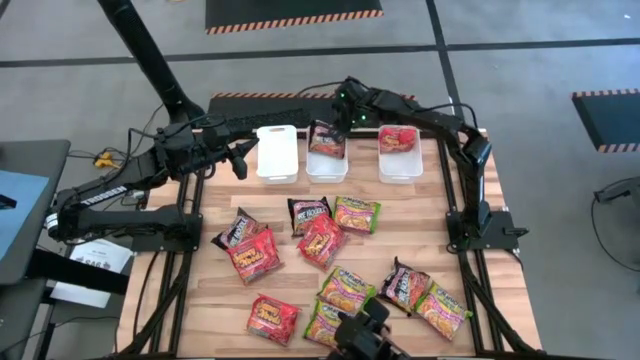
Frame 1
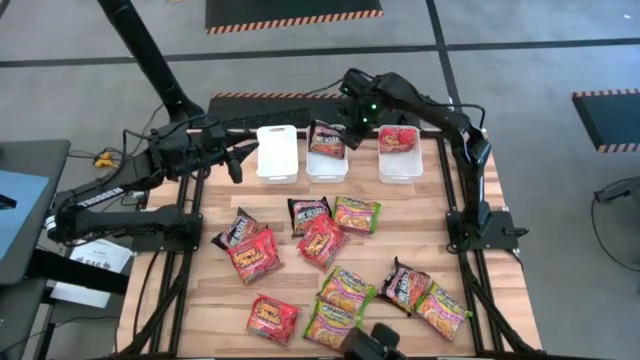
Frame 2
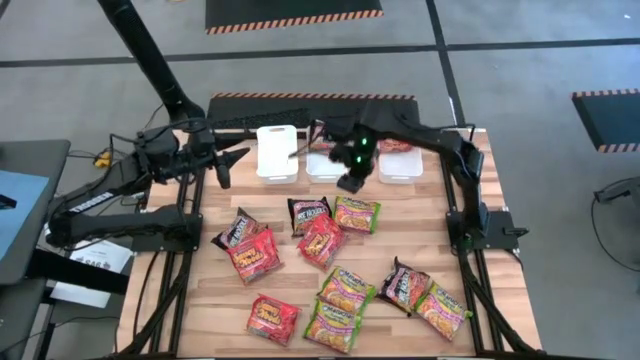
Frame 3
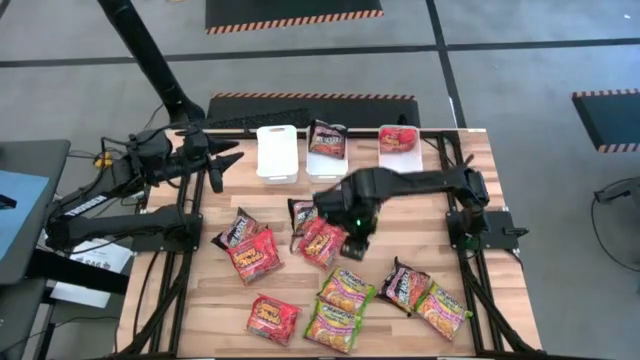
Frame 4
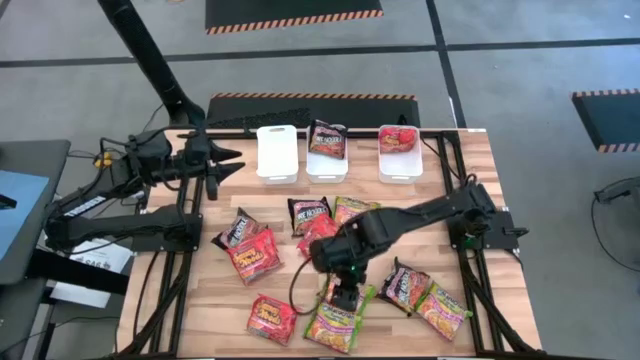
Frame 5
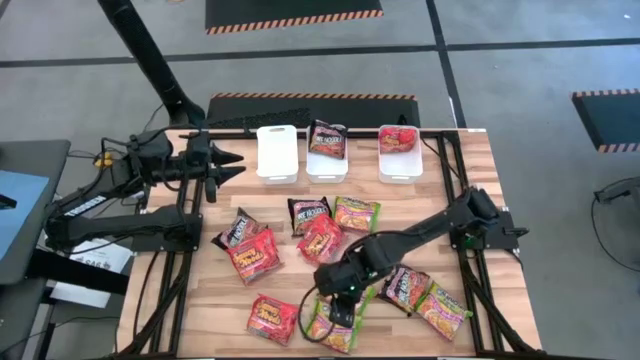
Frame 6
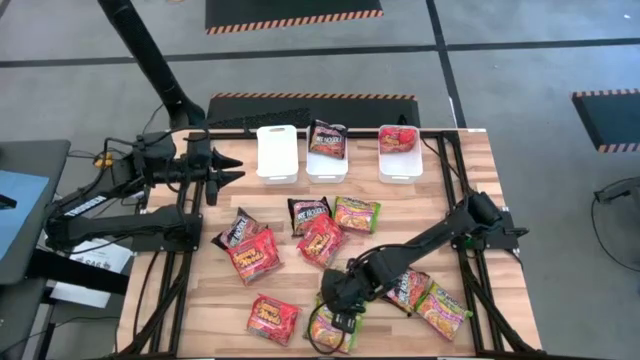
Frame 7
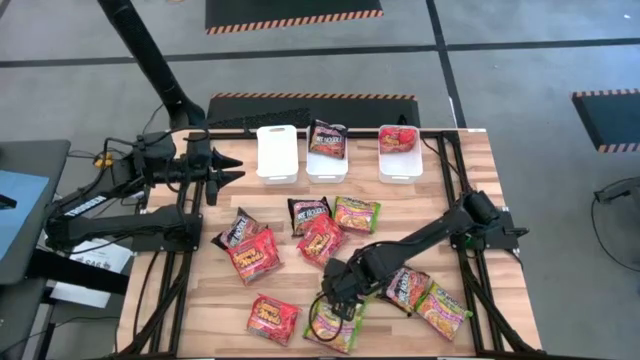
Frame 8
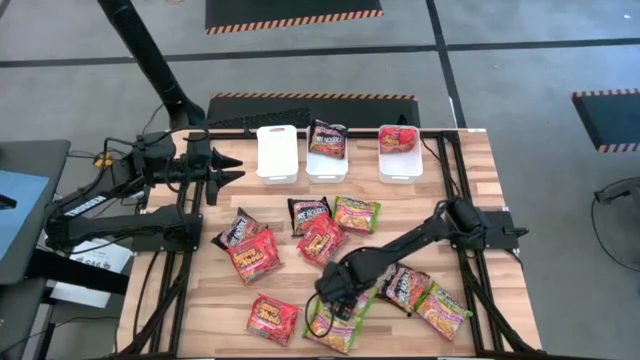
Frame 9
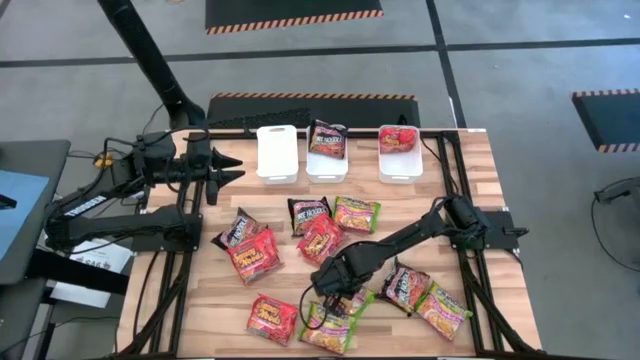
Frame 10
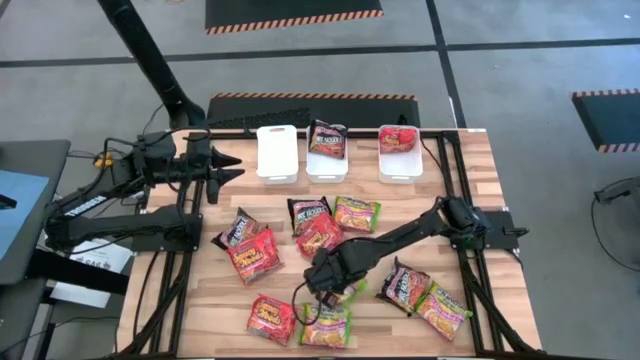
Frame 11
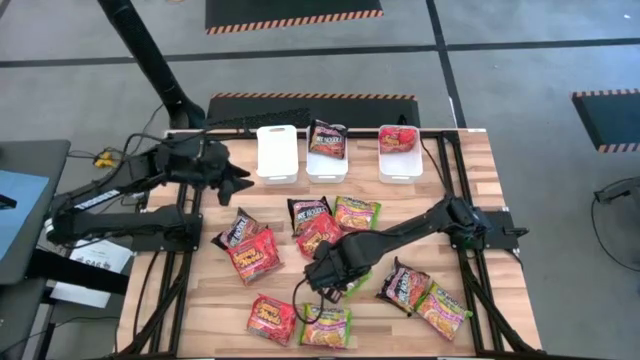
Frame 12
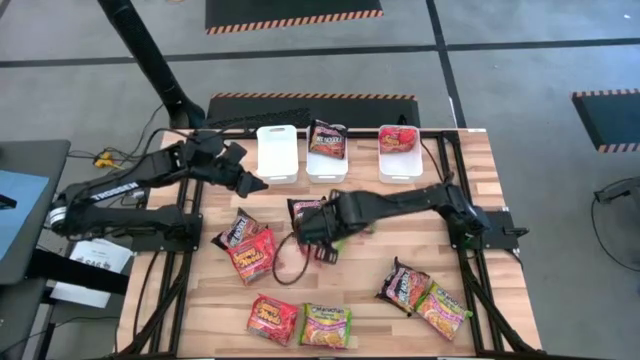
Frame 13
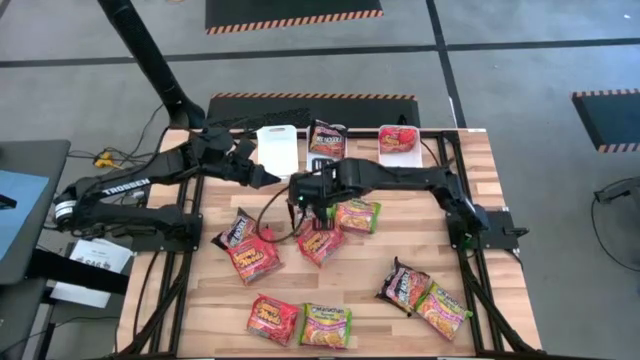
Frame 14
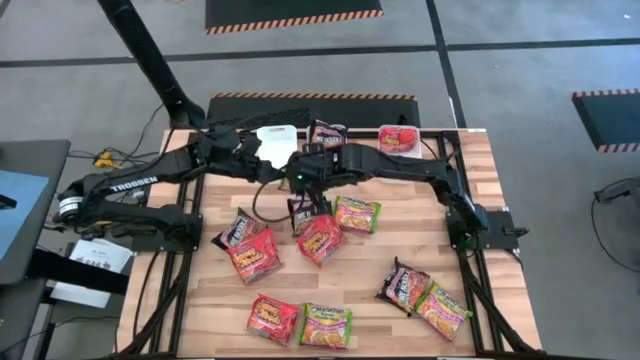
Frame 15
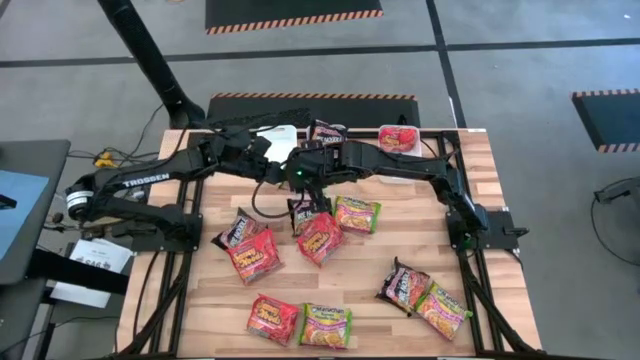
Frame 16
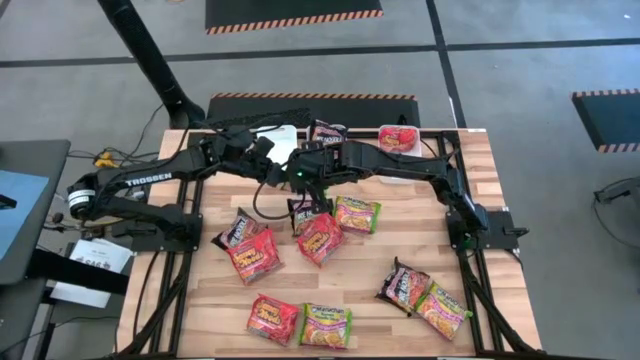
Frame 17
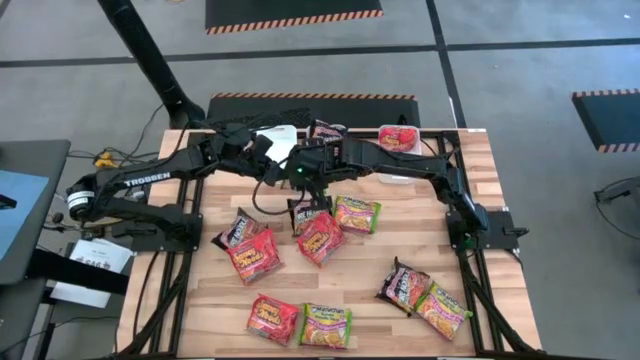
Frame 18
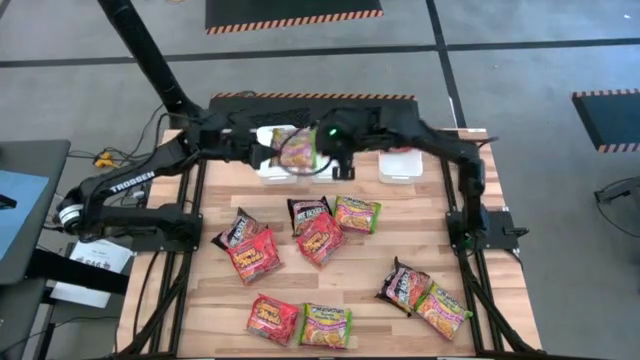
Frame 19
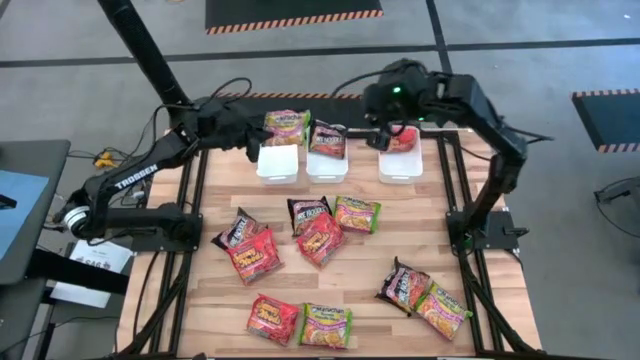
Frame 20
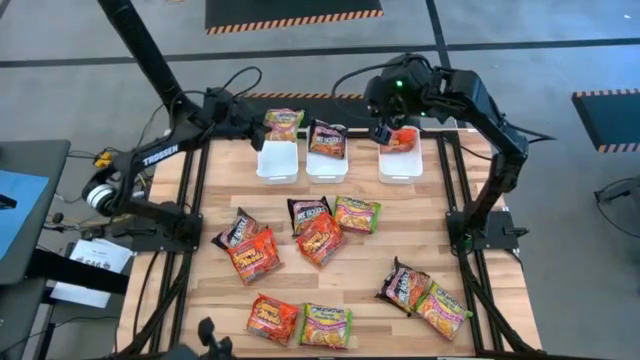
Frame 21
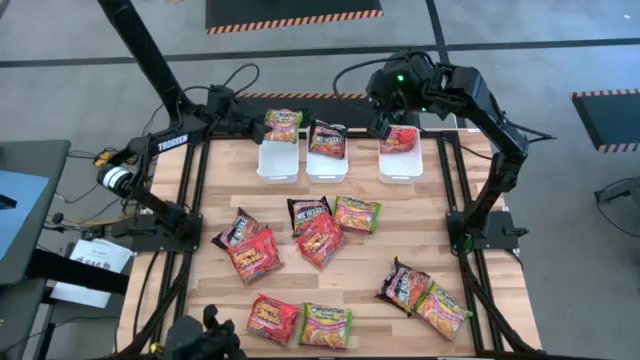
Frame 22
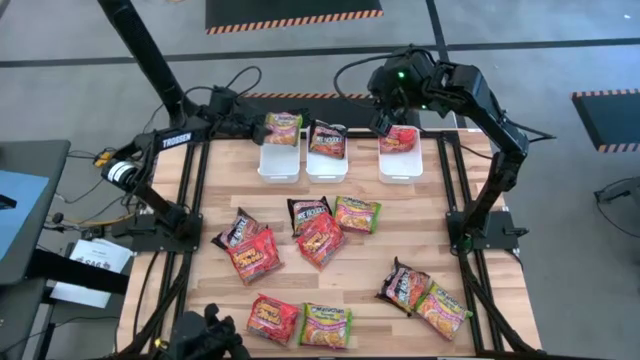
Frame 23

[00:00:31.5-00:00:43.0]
Task: Sort Maruchan noodles
Put the green noodle pack into the left white bin

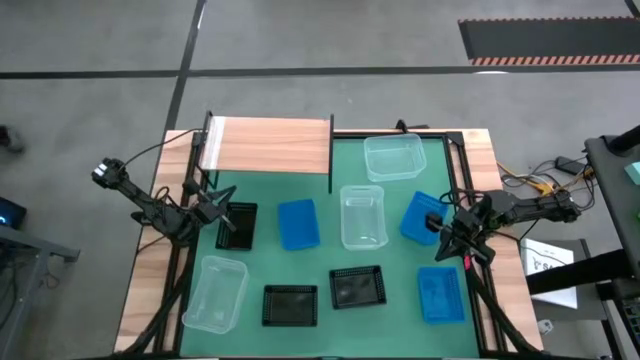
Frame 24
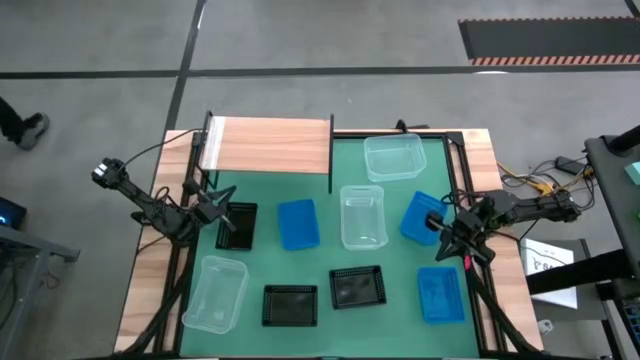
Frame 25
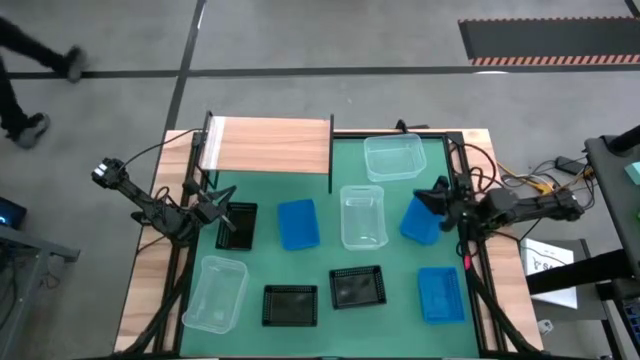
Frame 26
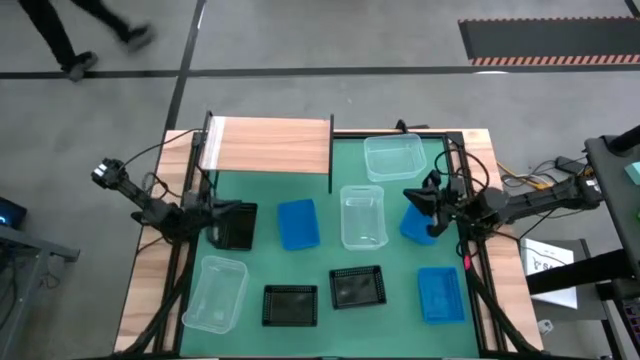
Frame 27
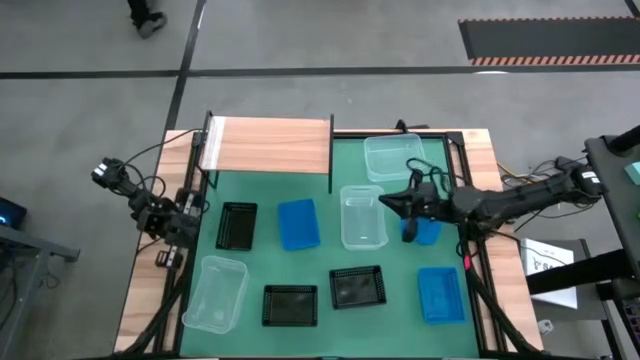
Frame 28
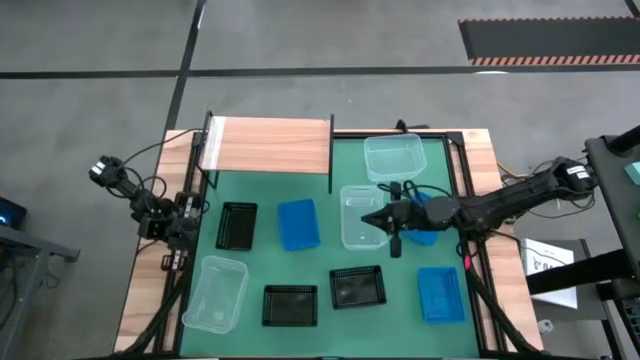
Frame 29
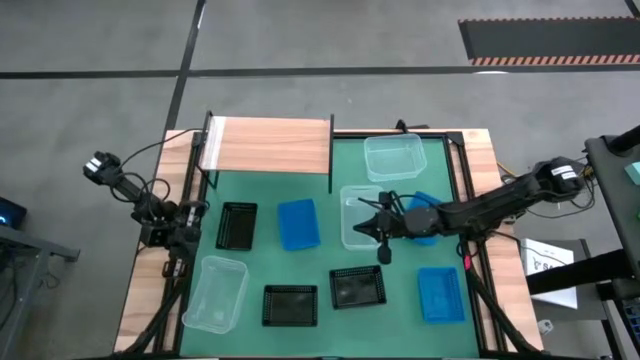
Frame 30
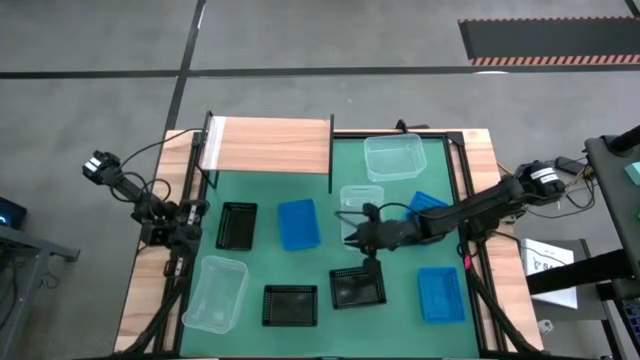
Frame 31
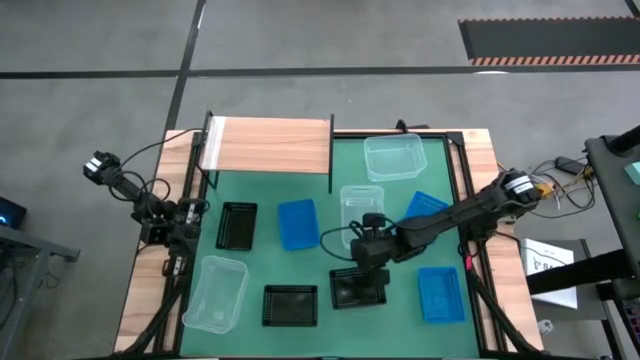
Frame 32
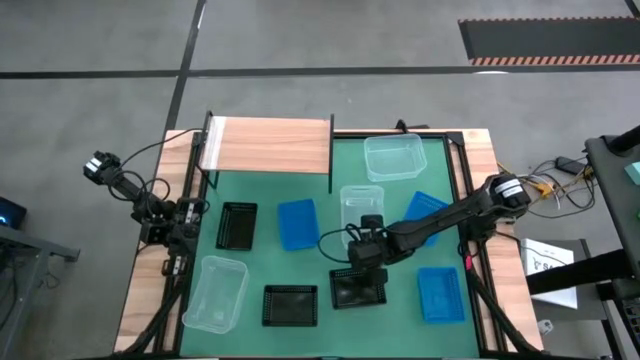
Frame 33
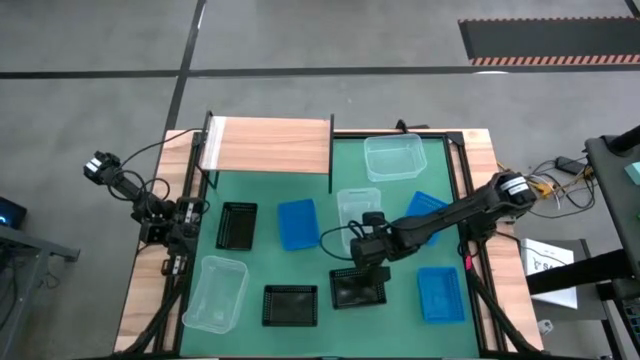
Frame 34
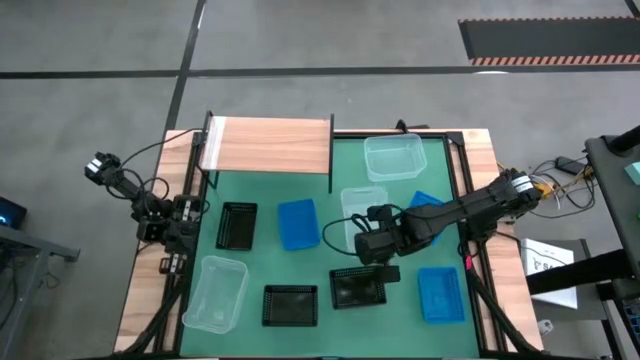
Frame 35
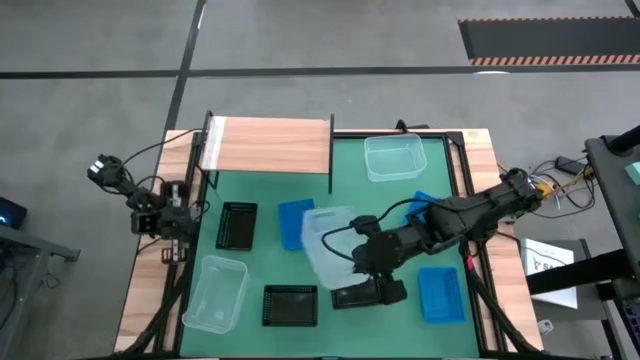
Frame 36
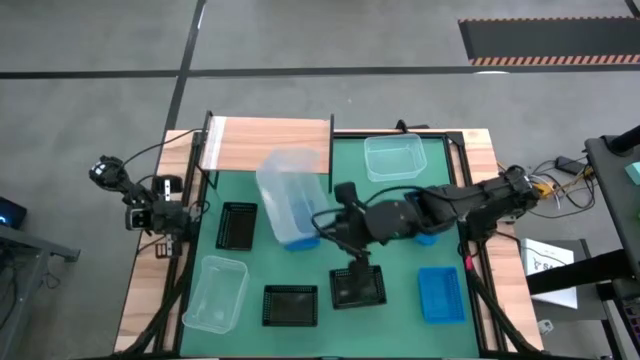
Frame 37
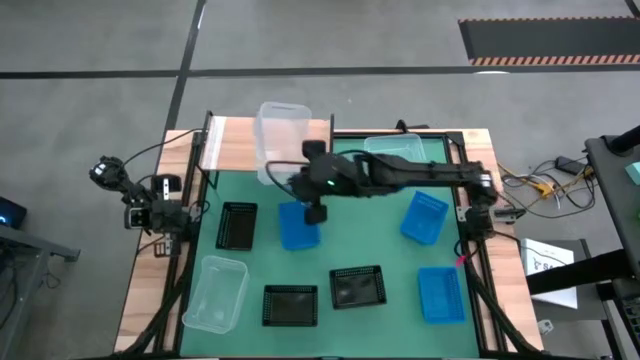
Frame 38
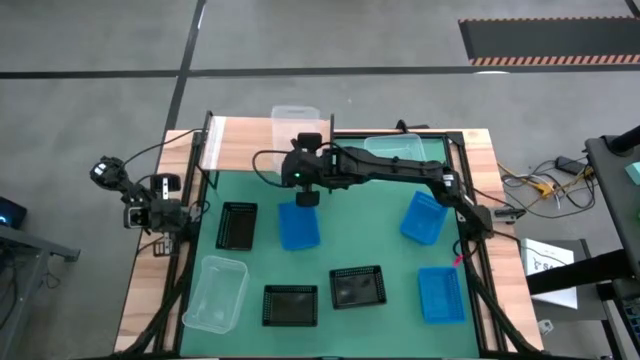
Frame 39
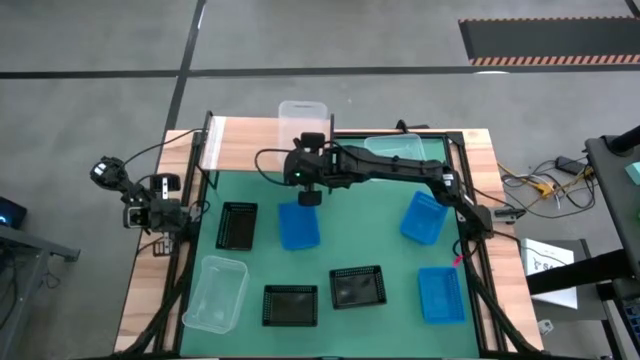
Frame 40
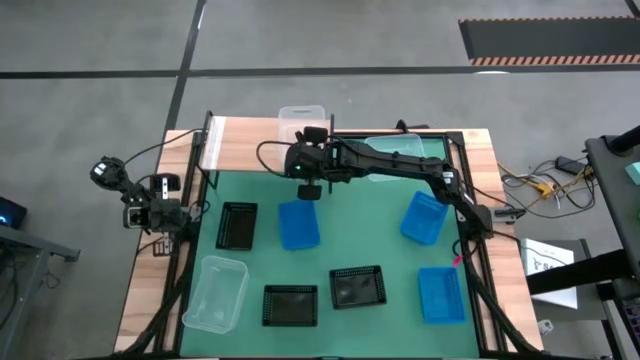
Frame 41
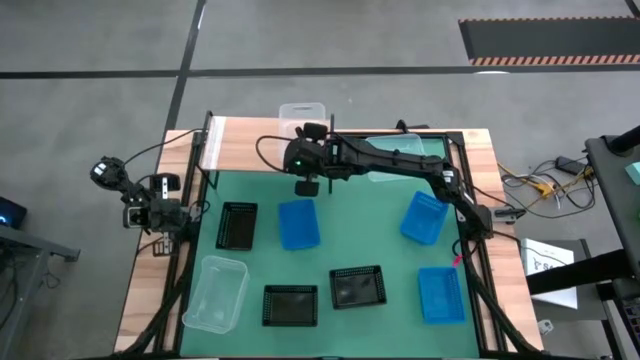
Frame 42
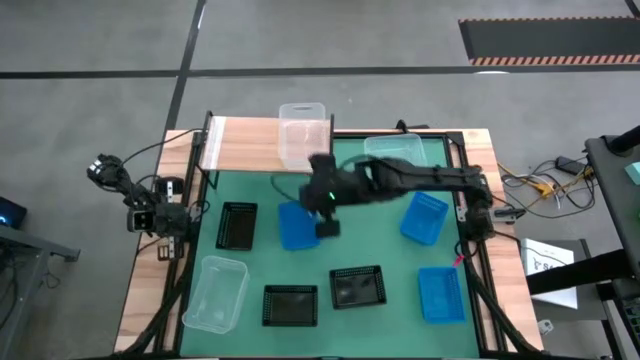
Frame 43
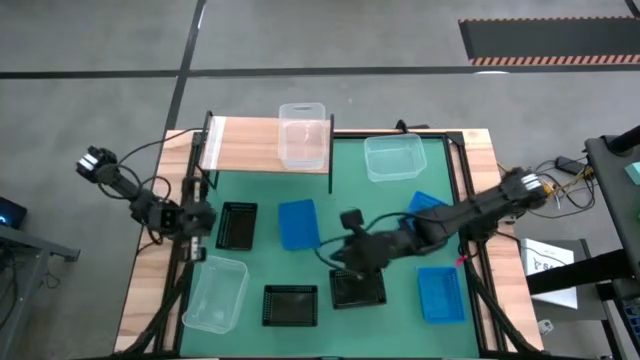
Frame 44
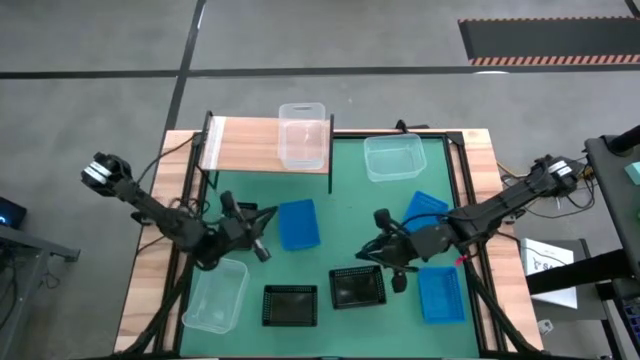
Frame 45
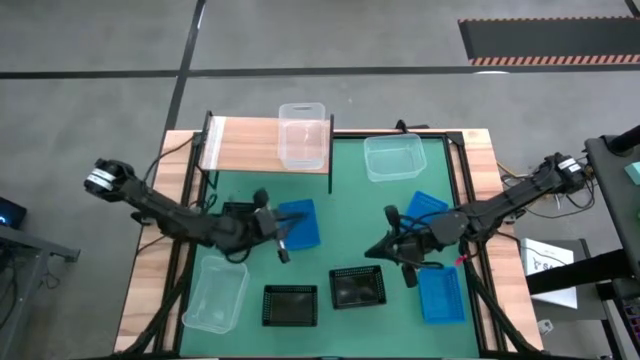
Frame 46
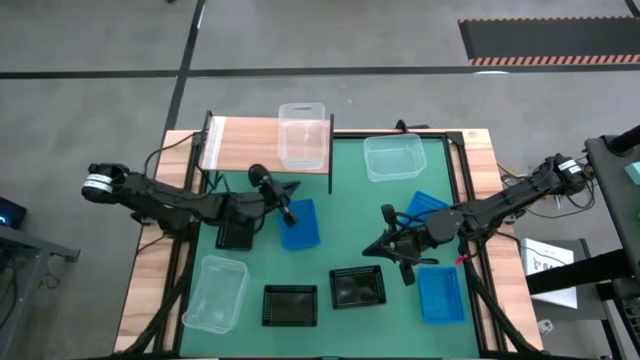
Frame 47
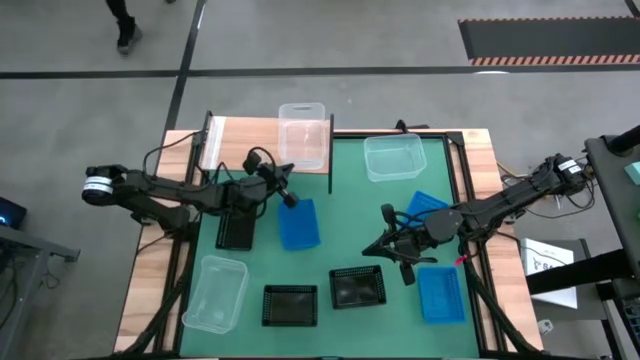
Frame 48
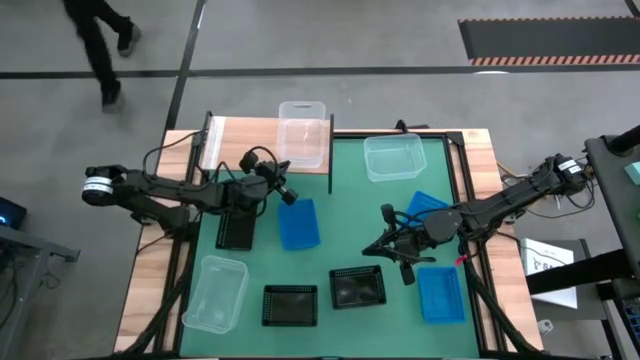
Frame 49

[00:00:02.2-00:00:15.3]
Task: Stack baskets on shelf by color
Put the middle transparent bin on the shelf
